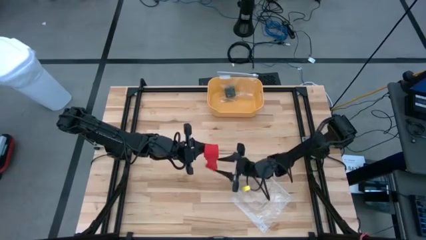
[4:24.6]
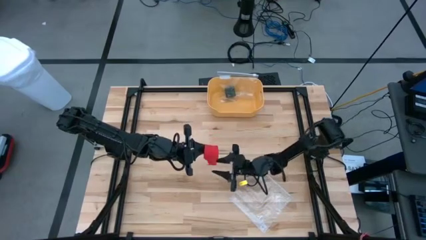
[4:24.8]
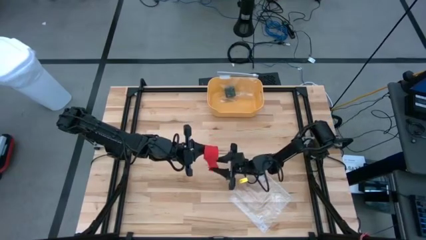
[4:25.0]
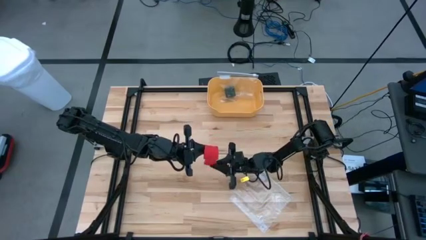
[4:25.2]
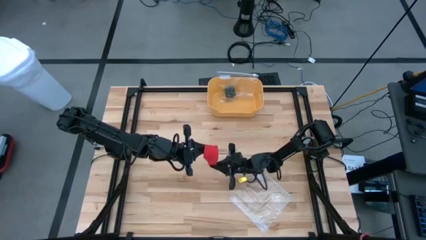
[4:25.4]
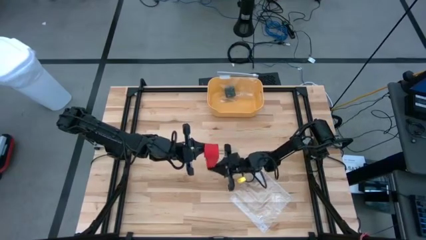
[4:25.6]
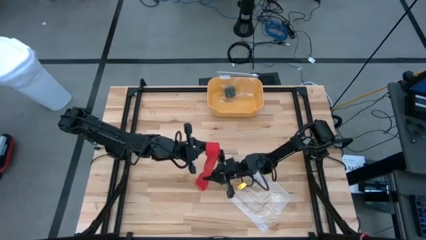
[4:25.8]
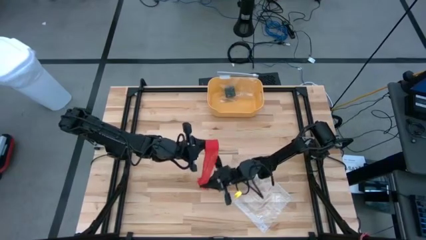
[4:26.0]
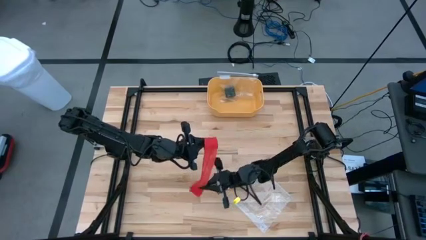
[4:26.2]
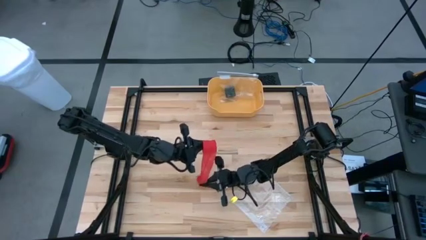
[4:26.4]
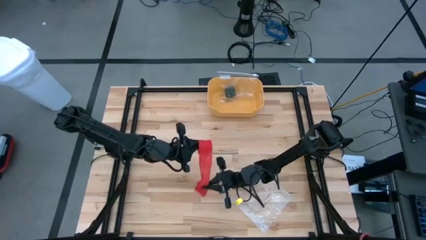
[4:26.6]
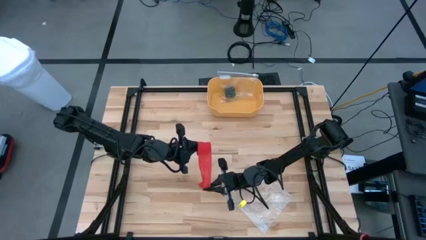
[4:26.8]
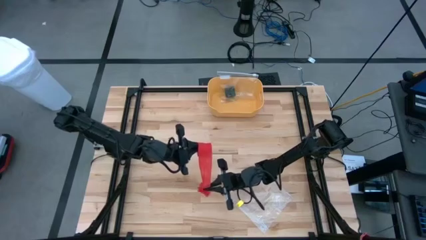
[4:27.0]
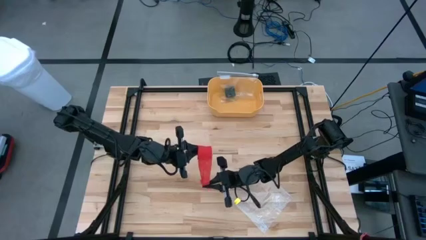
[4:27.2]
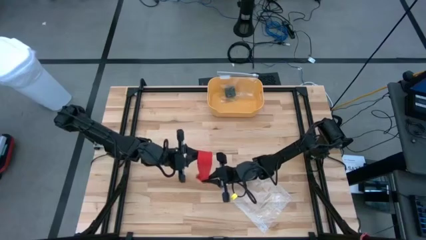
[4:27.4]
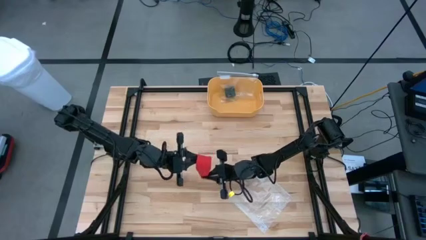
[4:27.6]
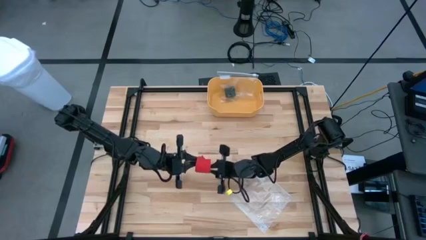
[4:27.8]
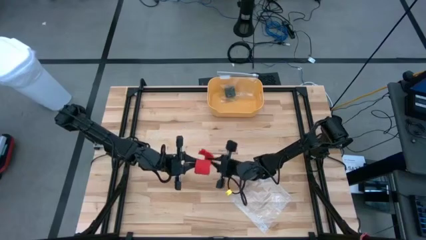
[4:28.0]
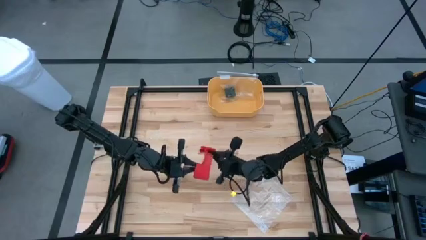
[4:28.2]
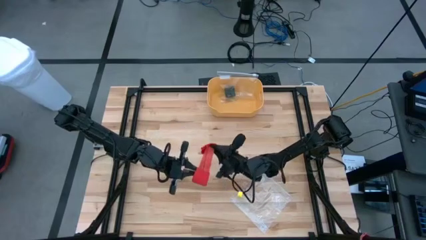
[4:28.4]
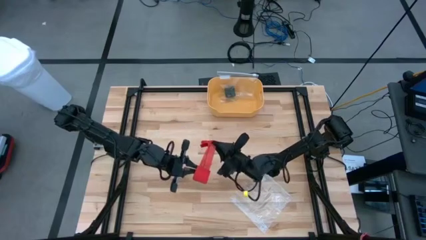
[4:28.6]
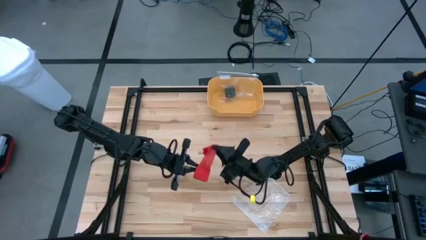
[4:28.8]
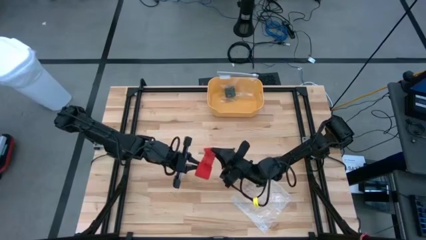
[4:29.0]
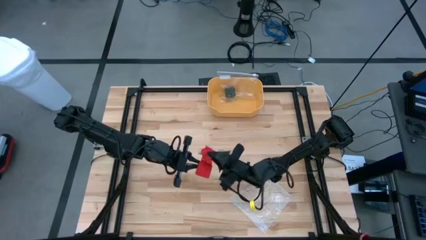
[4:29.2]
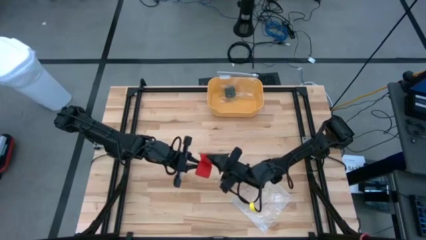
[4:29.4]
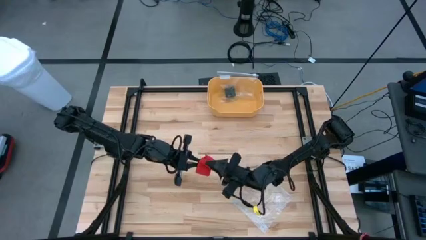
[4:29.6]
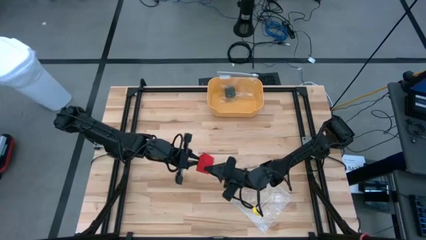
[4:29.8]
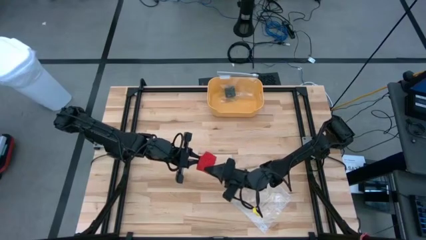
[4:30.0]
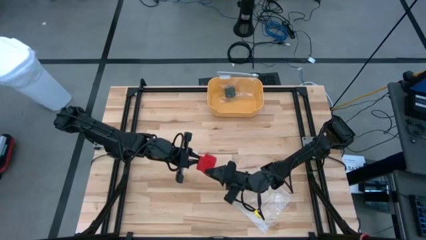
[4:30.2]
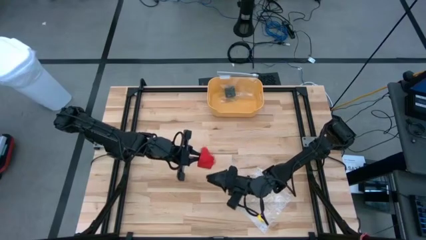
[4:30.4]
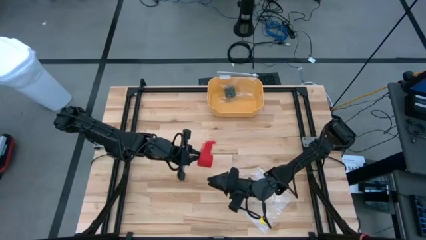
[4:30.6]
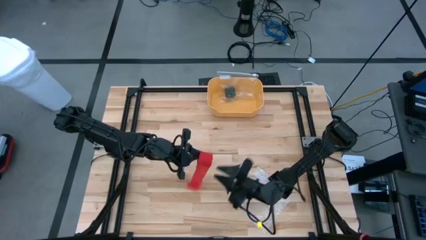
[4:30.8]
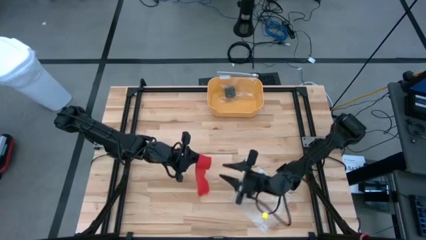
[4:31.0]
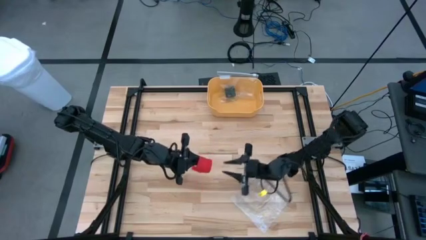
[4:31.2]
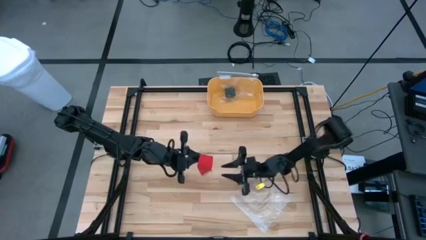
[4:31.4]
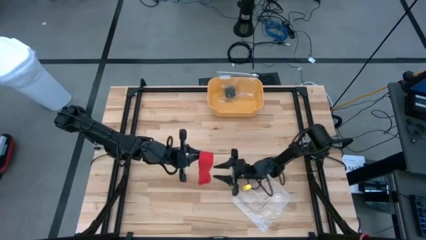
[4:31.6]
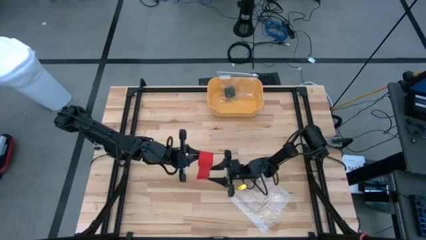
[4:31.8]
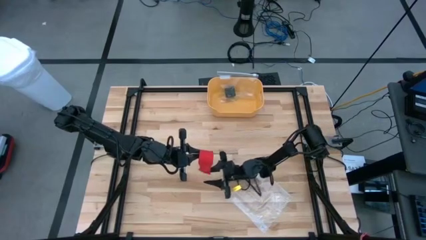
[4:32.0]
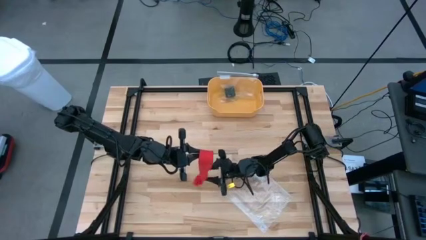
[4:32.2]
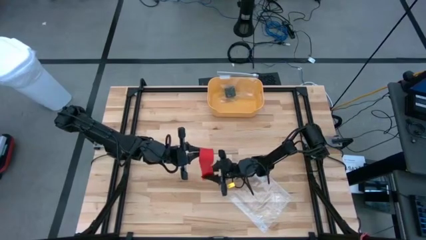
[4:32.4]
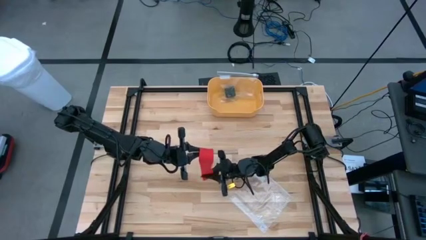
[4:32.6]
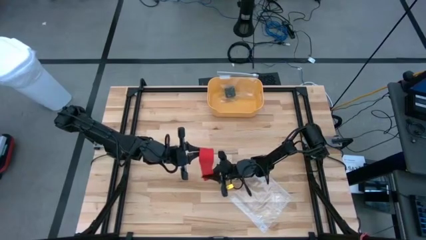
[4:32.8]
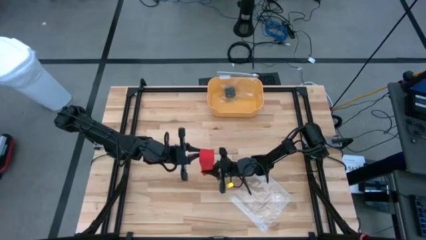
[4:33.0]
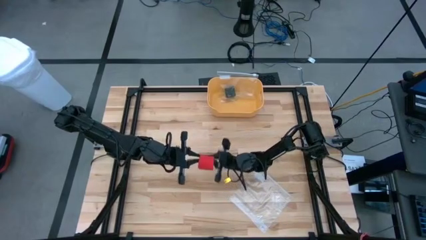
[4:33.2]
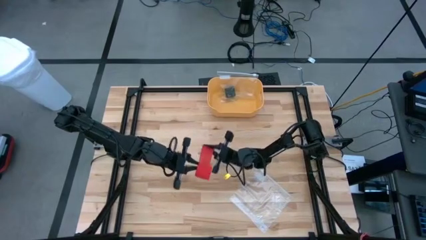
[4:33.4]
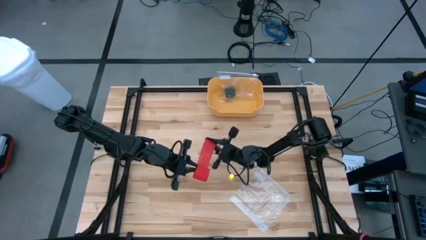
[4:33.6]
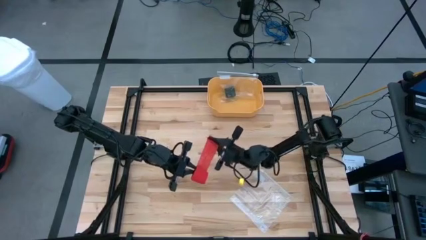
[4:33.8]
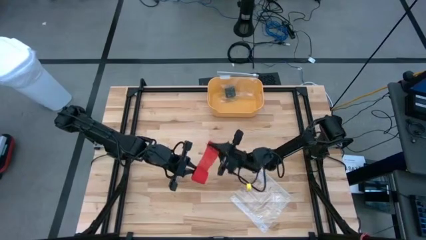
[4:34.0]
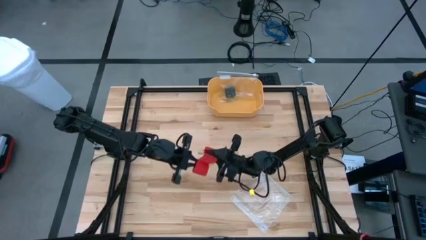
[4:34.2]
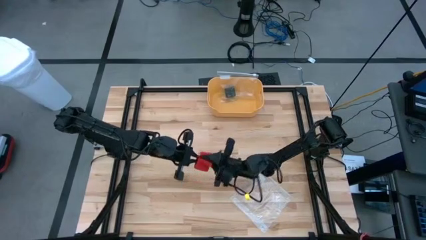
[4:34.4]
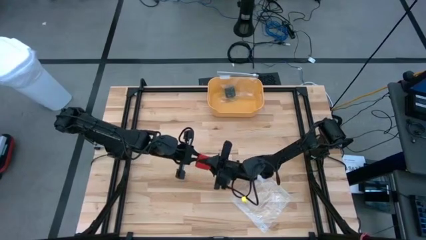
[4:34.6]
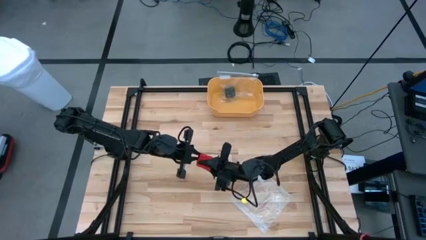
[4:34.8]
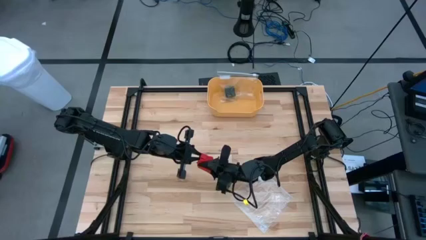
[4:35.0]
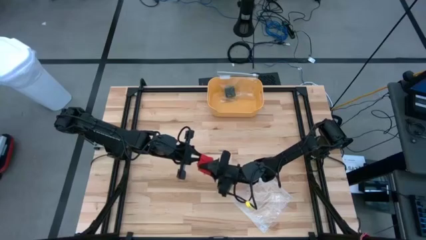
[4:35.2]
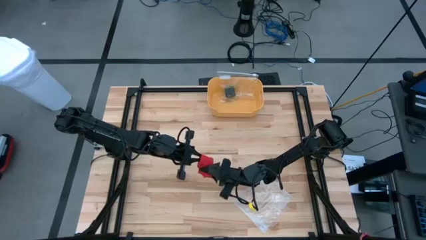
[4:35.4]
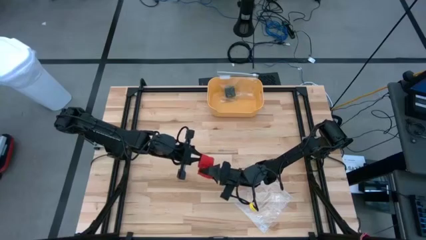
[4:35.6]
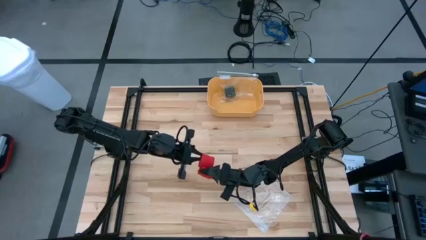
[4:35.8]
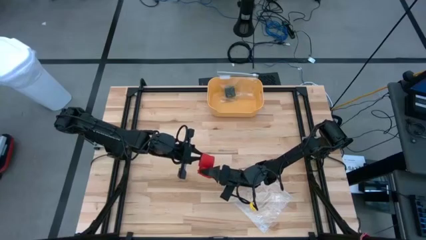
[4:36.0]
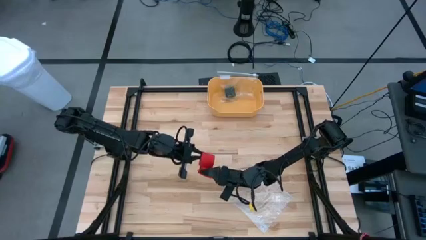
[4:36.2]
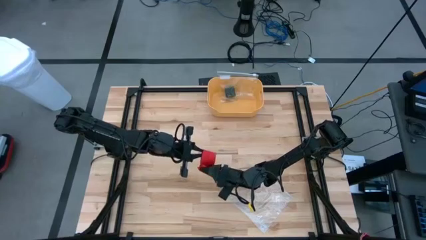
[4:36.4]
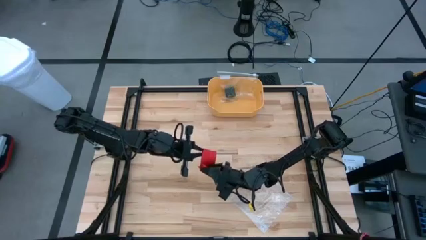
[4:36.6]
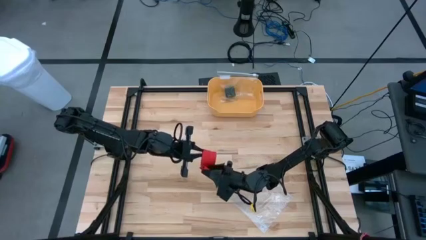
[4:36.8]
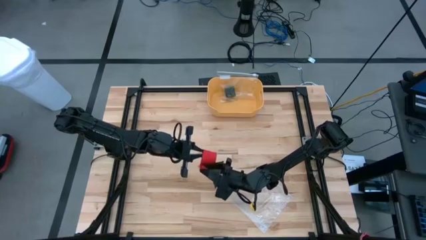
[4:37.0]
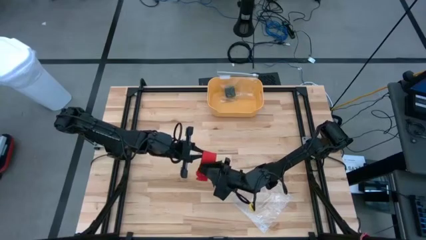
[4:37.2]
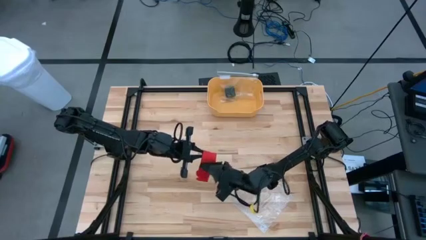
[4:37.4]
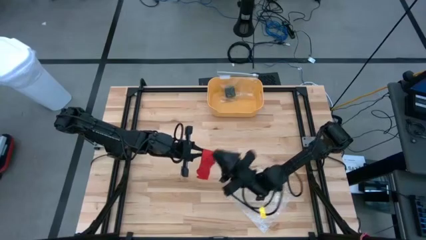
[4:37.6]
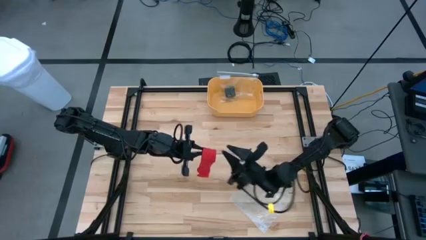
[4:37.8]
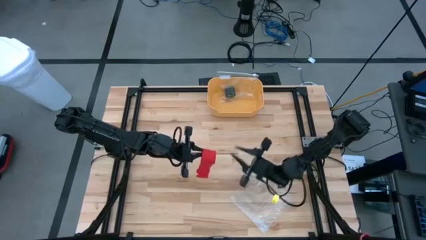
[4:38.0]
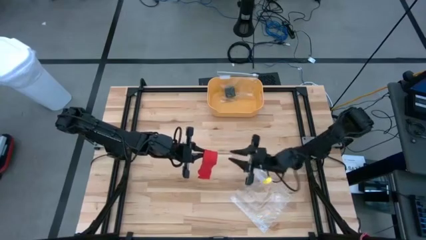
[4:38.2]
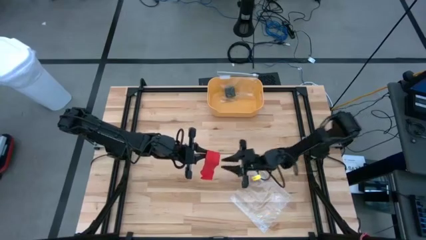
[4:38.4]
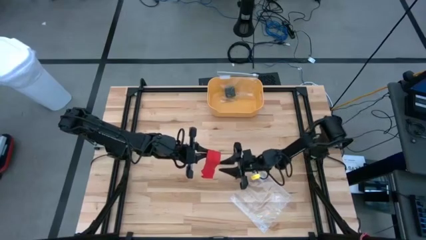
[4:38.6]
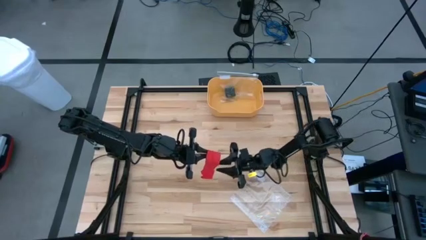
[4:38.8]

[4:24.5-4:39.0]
Task: Roll bandage
Roll the red bandage

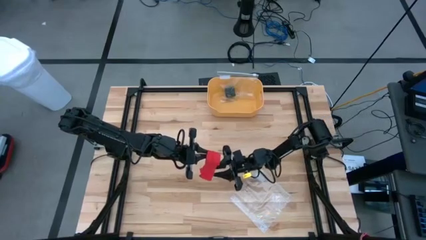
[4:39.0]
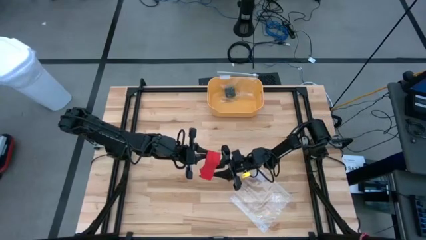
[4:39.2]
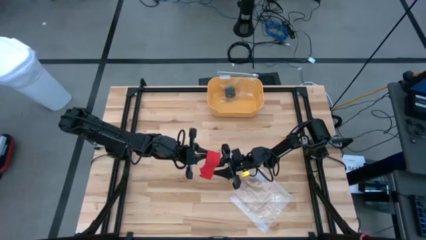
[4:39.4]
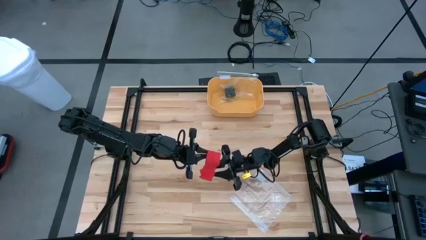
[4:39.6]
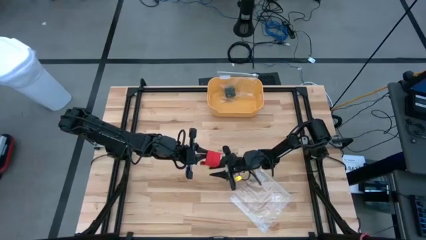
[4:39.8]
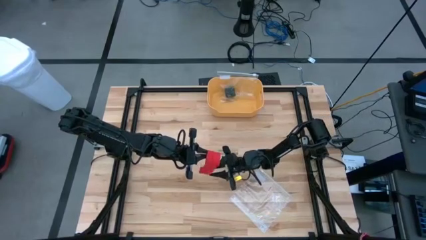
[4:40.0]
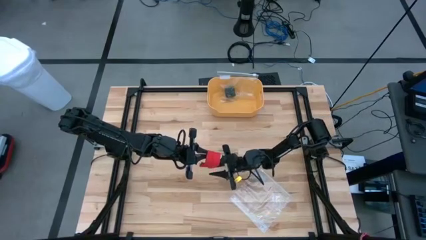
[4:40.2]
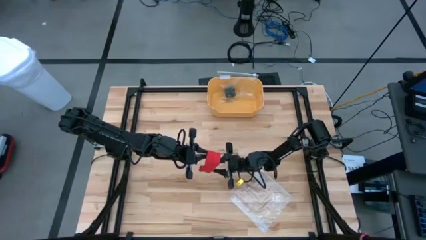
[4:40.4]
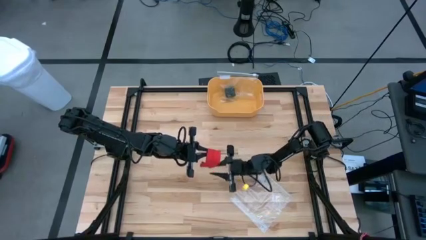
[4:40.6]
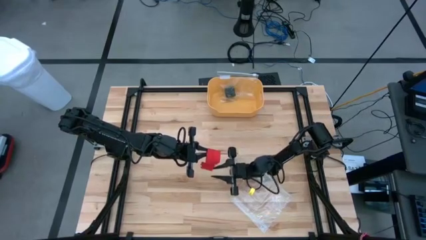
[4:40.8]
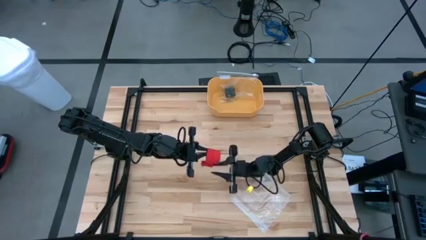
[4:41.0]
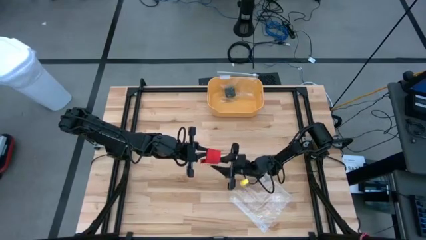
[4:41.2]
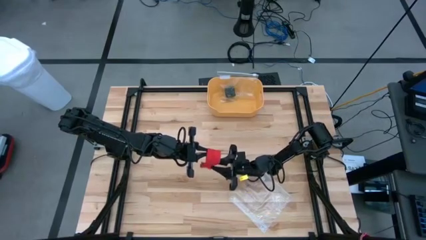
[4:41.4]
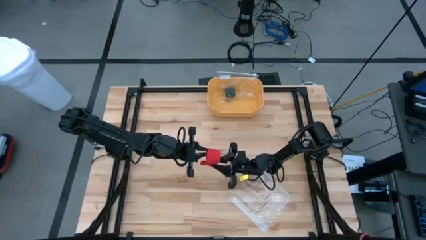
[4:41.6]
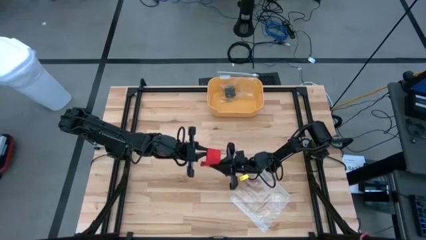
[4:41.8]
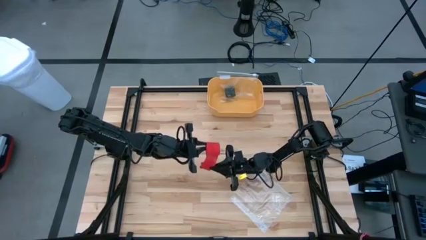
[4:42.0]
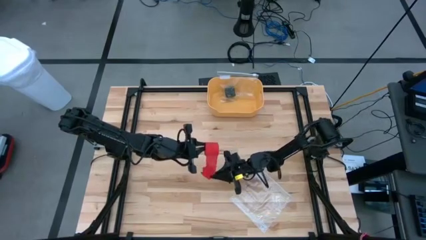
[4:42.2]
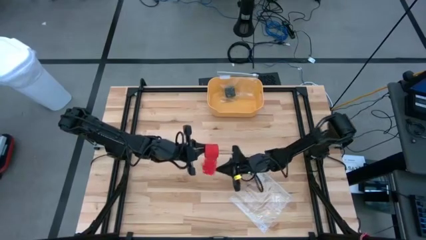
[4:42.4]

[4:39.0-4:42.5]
Roll the red bandage
